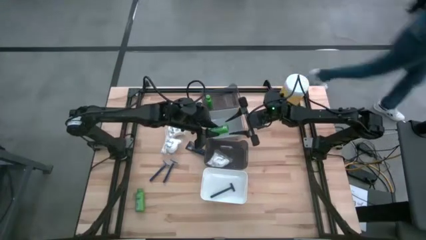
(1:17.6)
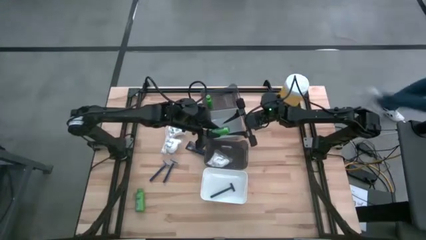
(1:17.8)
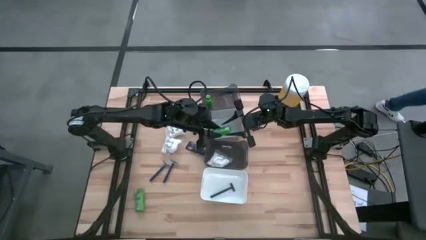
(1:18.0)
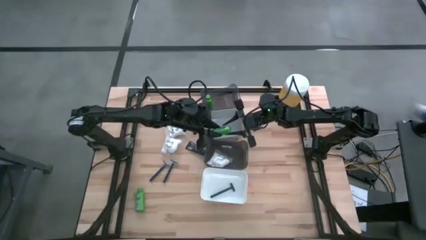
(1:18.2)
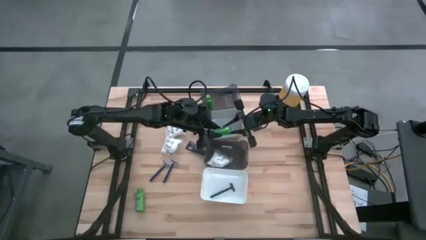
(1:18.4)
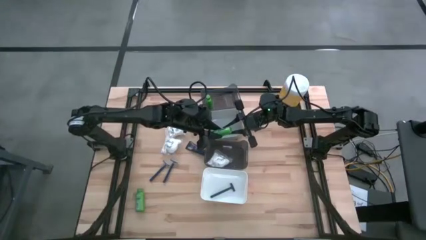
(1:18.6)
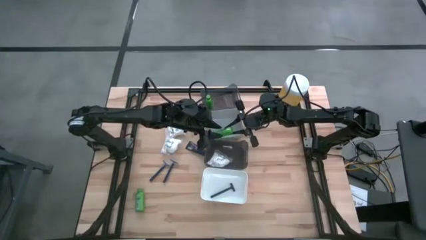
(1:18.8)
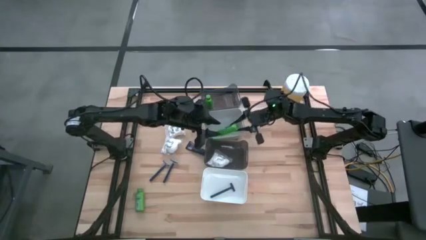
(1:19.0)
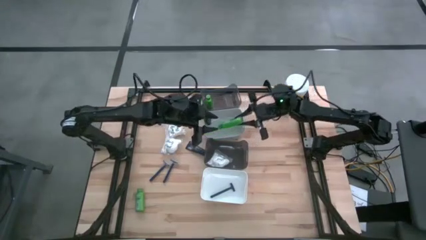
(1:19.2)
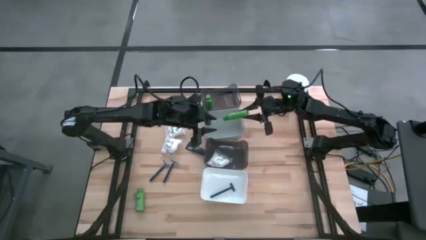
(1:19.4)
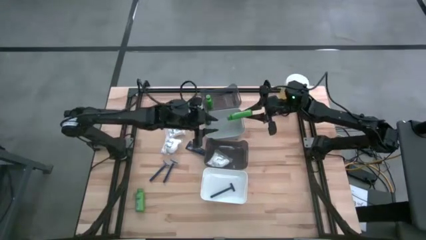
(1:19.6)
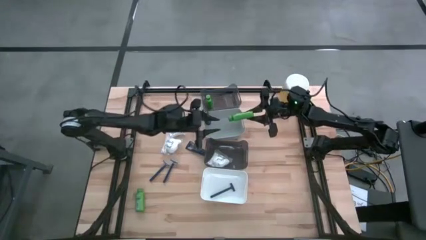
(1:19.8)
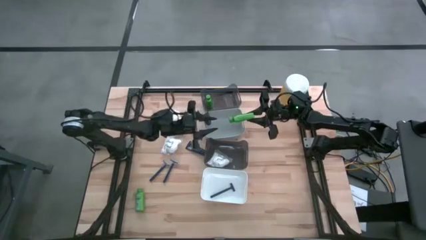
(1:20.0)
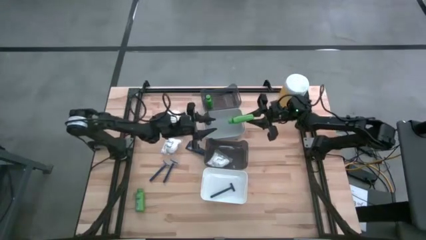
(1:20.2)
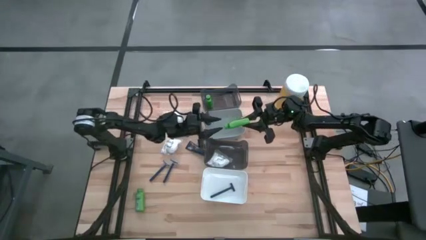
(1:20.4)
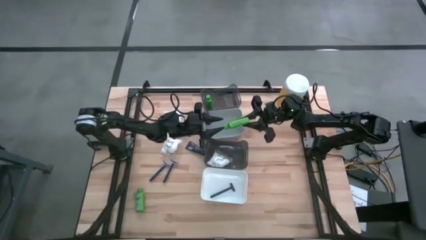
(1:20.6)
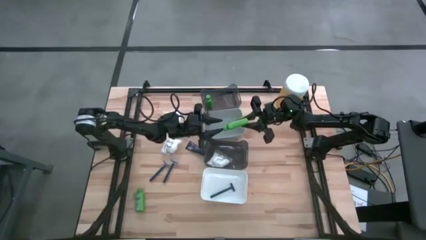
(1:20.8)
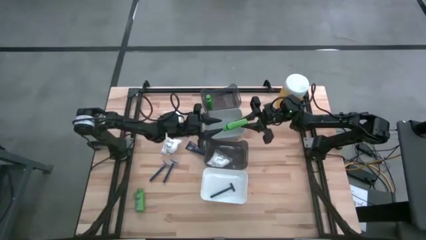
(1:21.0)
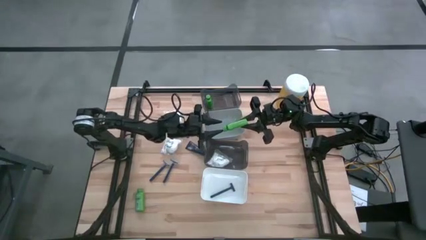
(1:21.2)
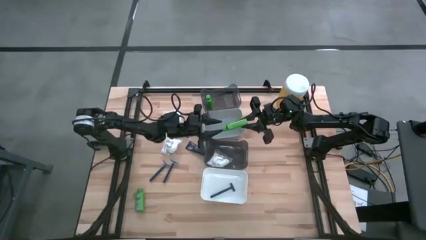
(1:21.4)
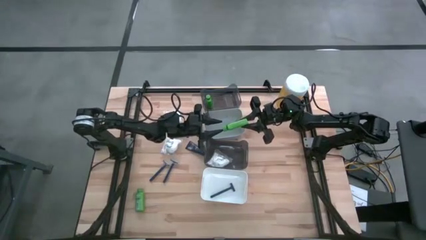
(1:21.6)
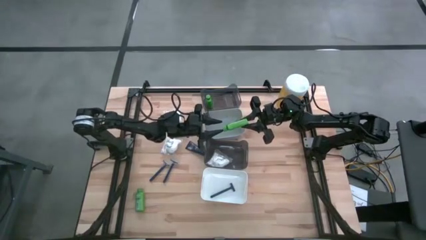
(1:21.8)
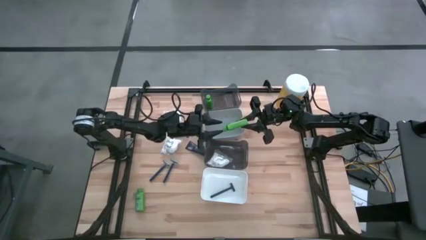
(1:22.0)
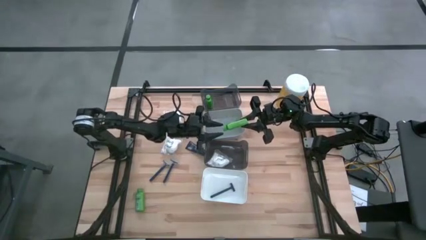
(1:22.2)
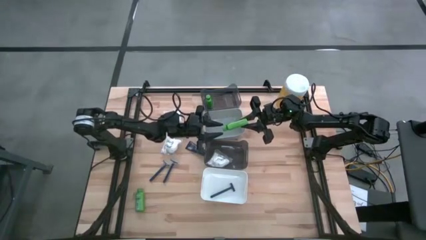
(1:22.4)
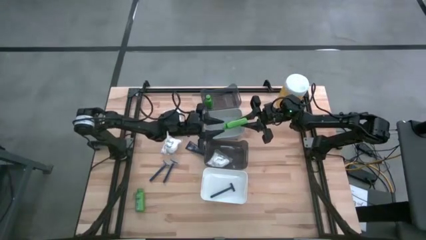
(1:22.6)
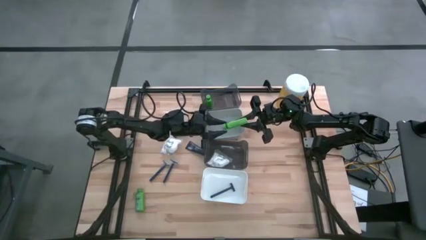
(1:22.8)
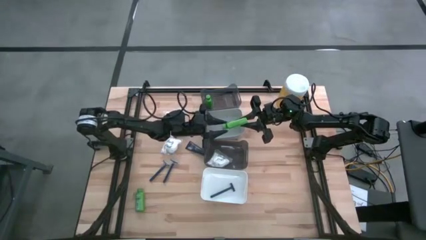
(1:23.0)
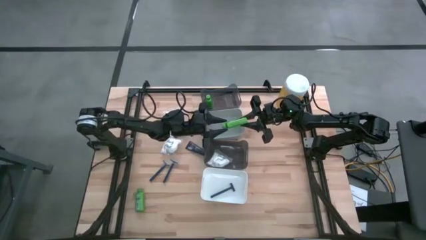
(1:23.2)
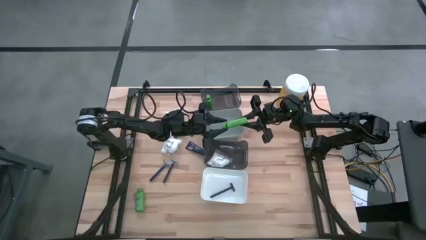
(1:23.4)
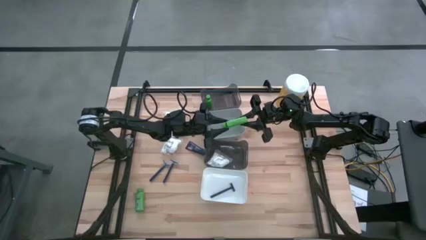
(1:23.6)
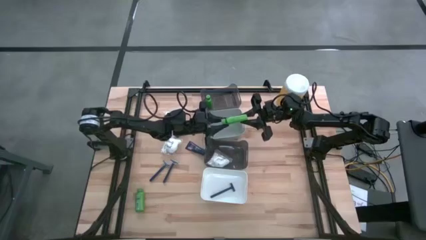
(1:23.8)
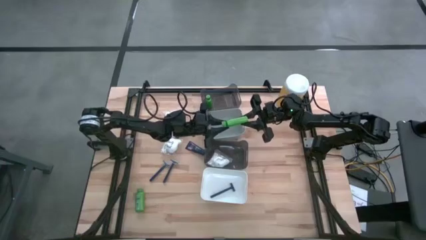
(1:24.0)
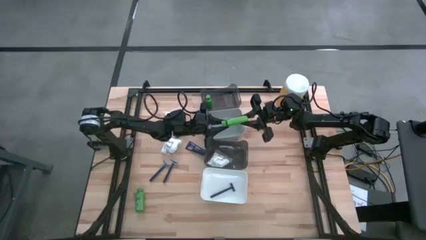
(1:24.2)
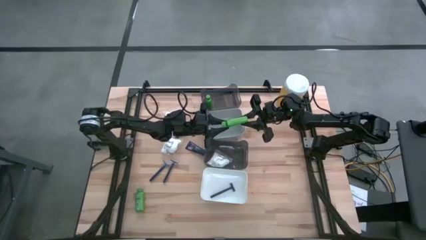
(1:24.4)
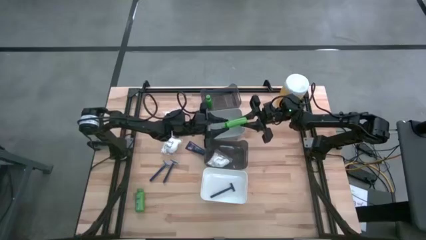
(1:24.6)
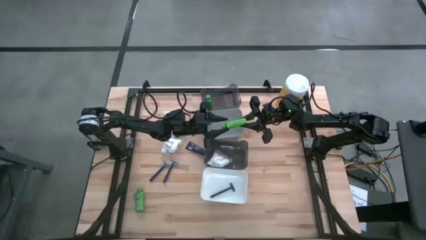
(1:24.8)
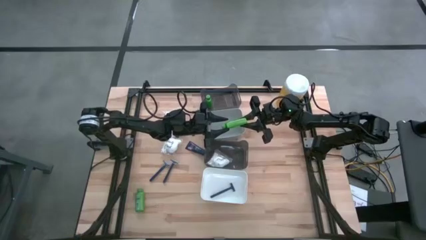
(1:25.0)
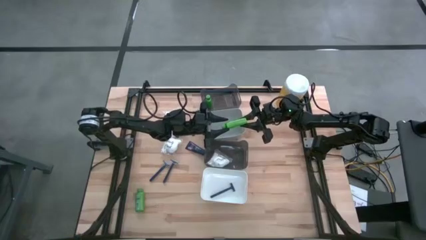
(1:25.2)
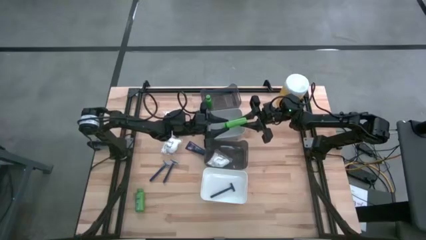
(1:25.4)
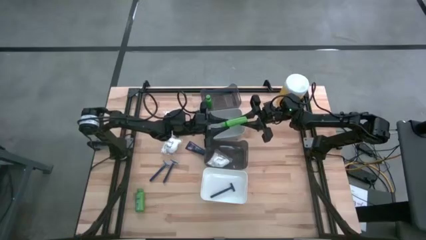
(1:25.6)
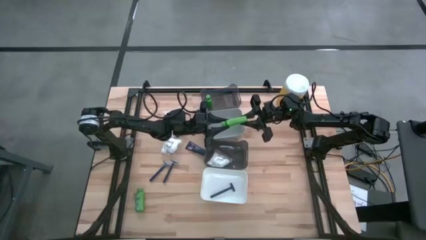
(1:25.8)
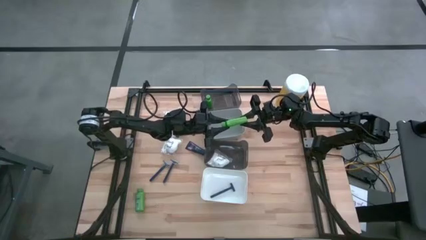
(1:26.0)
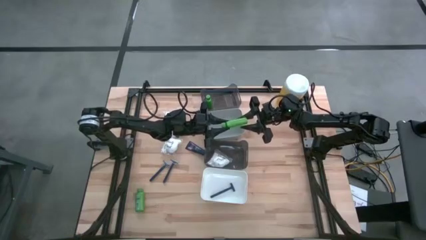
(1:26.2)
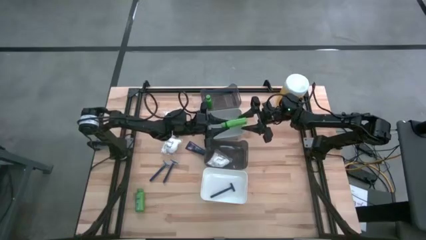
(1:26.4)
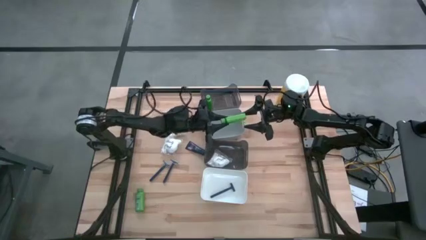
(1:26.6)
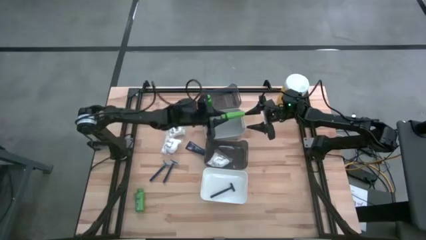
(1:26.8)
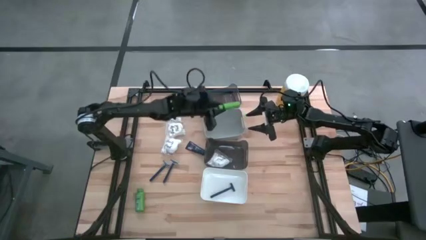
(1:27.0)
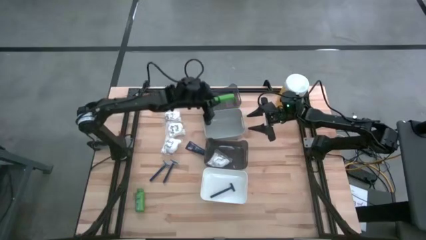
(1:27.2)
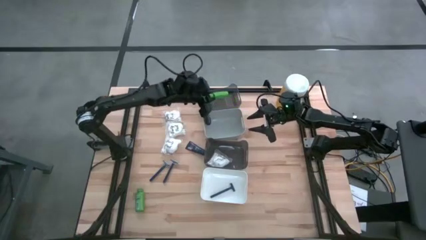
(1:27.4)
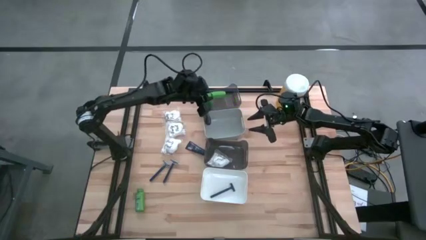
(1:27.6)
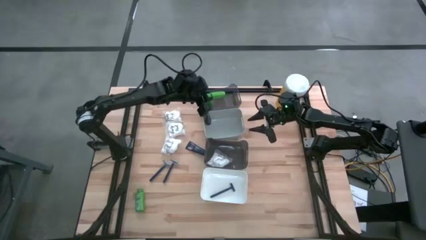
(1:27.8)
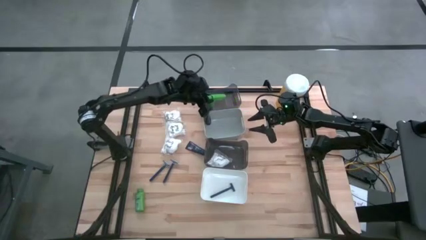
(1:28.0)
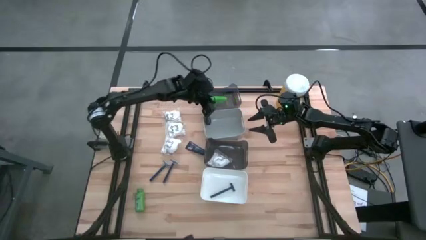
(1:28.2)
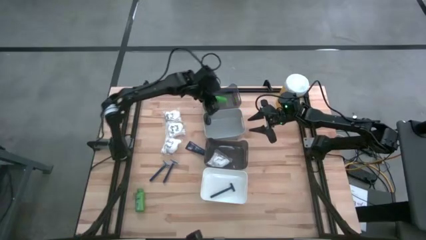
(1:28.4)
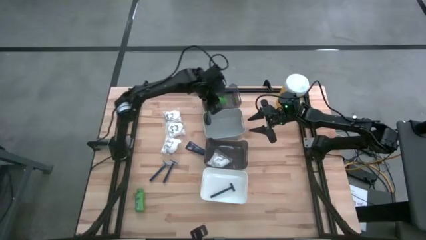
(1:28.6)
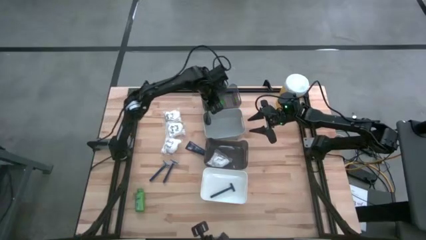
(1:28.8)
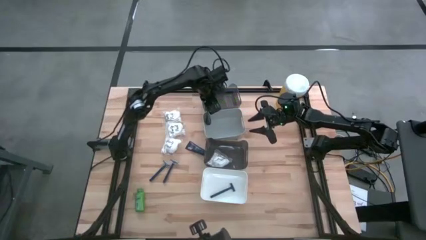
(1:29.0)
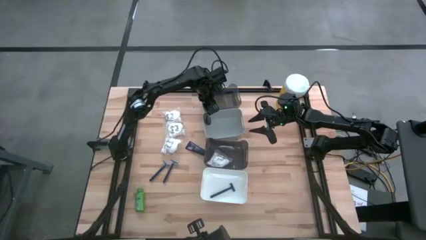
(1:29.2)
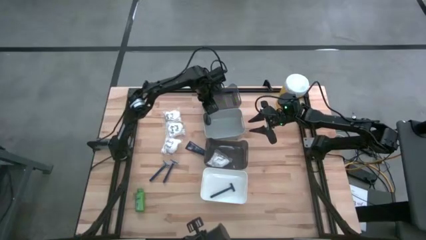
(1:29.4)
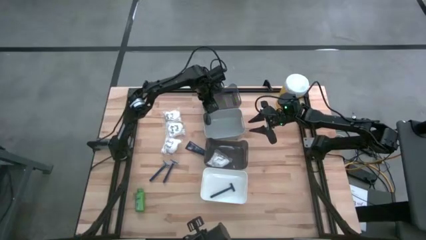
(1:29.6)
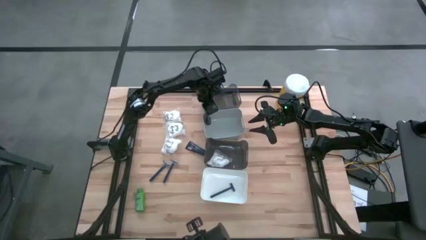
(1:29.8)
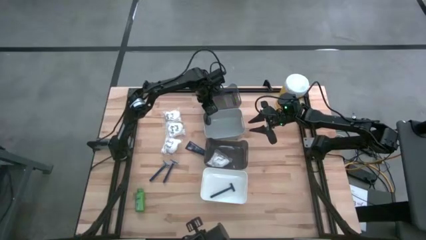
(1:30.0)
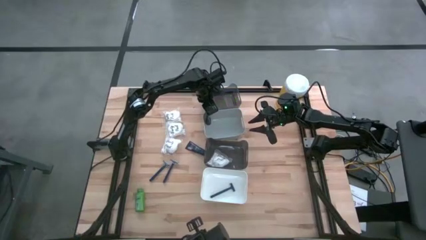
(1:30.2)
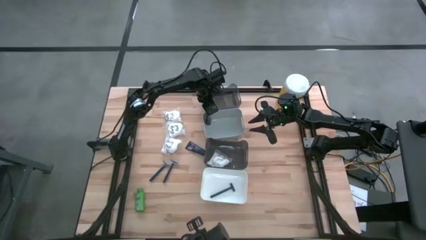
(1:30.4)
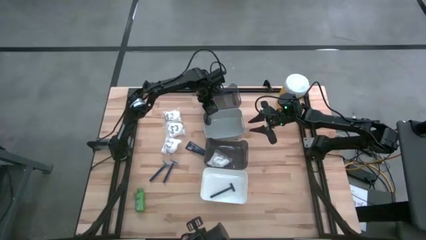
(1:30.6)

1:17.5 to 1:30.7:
Task: Pick & Place Travel size toiletries
Put the right green shampoo into the top black bin

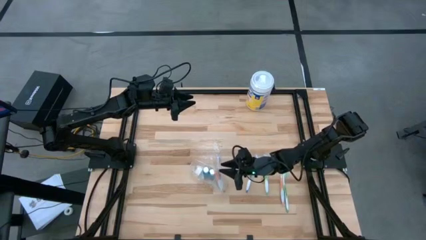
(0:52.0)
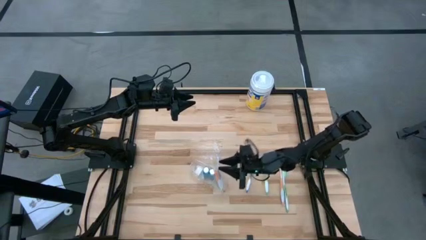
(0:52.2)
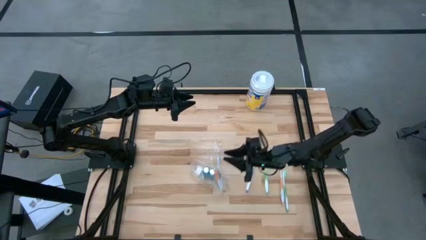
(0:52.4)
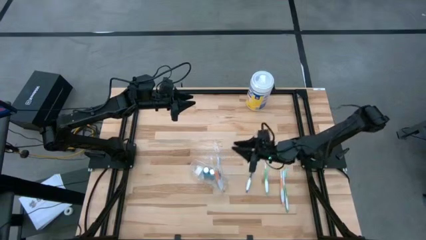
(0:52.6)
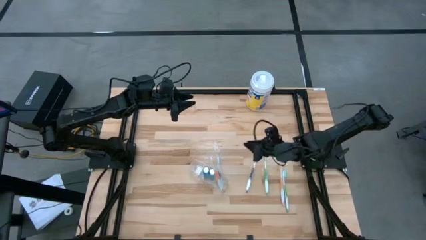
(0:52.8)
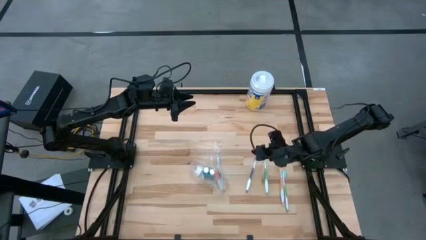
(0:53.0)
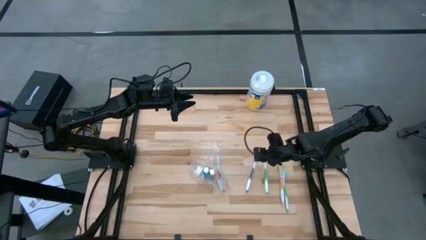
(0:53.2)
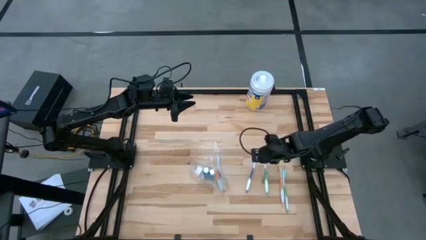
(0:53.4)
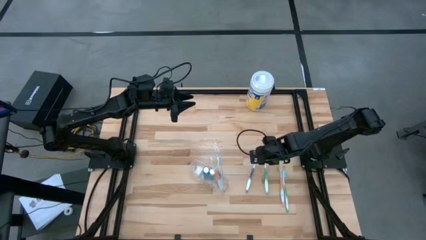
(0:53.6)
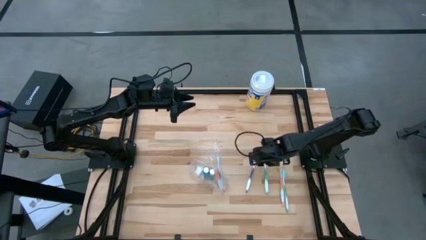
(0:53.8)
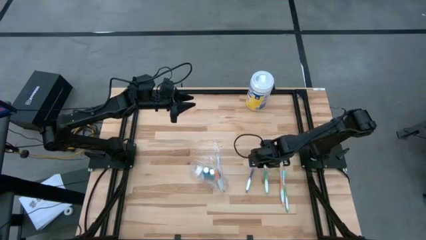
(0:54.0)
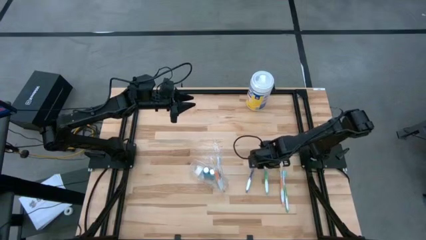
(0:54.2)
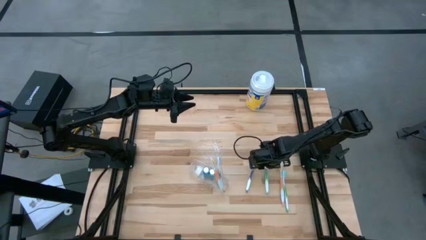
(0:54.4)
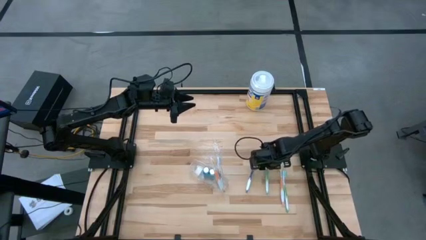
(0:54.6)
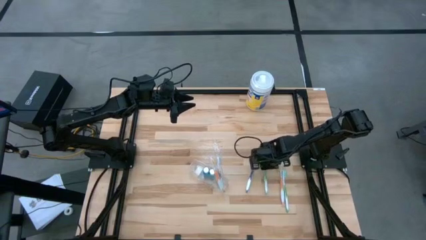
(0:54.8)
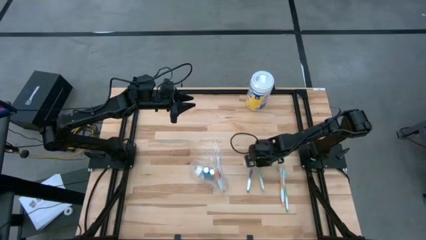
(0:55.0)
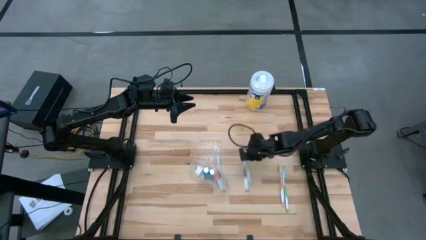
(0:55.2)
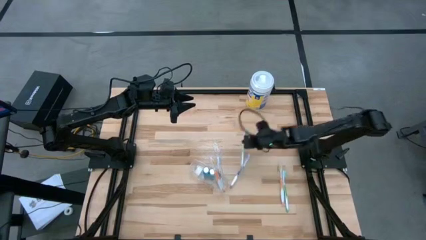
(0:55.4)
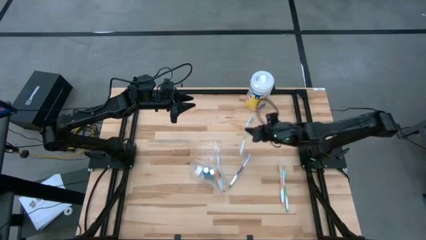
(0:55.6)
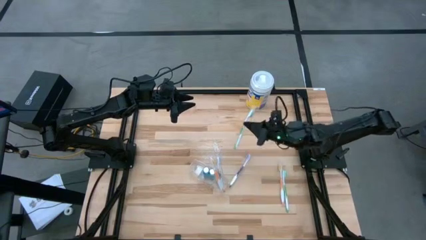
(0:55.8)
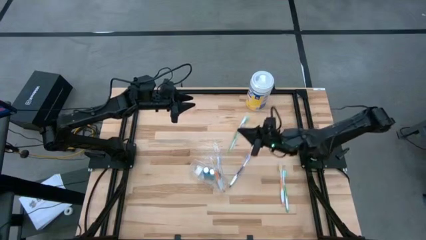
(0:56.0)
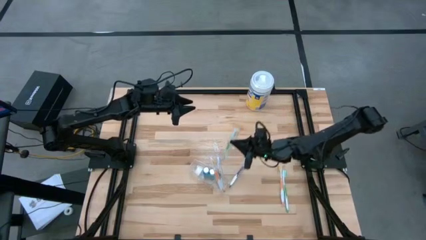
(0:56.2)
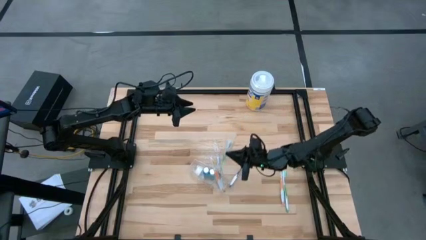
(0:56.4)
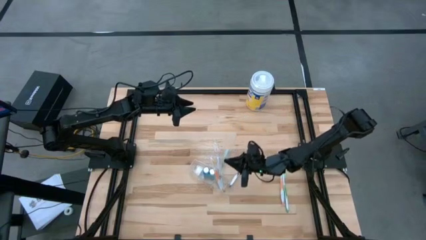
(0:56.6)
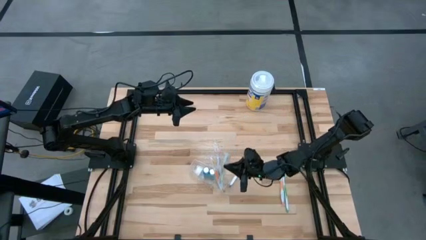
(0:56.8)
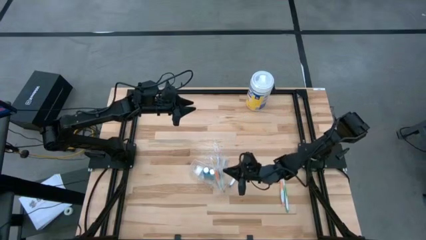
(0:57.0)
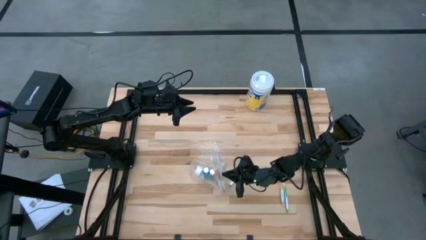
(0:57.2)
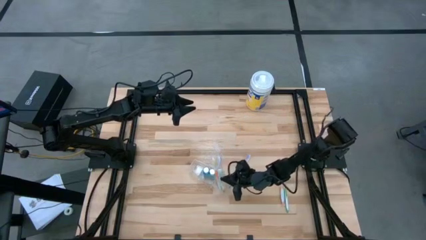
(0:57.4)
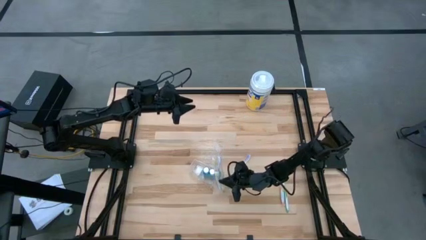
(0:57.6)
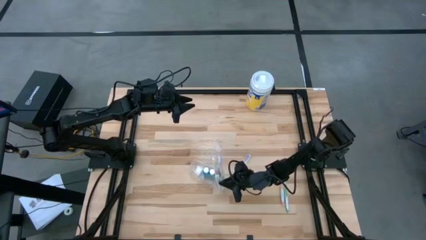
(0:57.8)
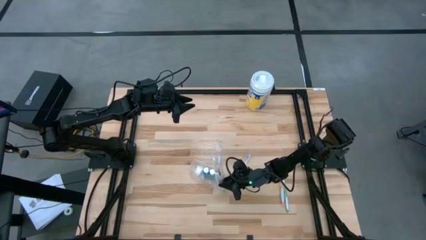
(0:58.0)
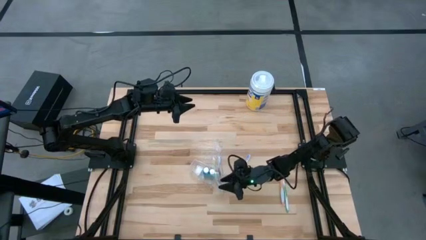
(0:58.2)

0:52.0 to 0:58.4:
Task: Pick & Place toothbrushing station
Put the left green toothbrush into the transparent organizer
